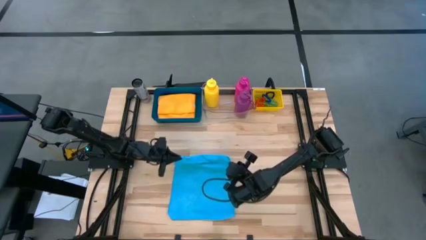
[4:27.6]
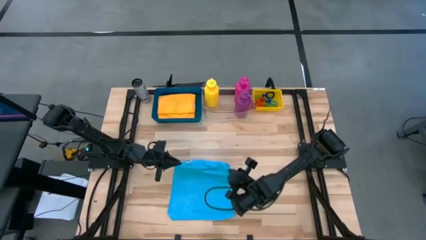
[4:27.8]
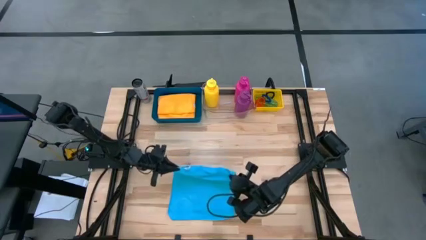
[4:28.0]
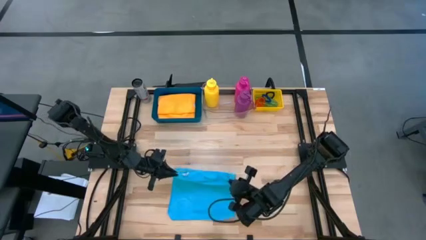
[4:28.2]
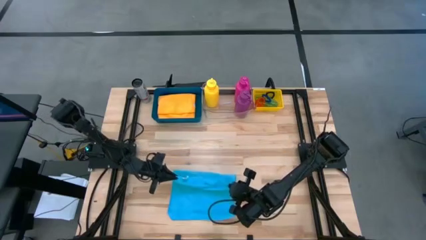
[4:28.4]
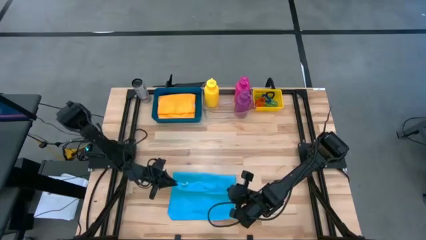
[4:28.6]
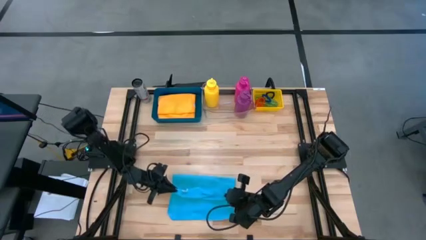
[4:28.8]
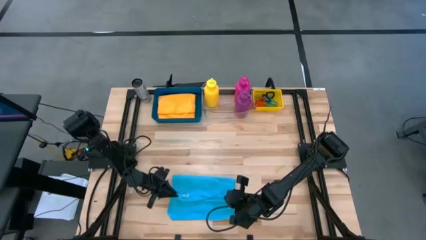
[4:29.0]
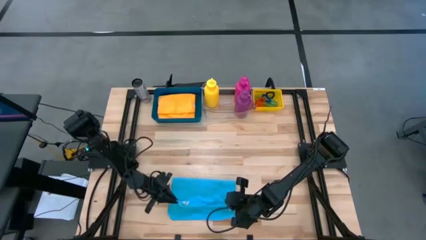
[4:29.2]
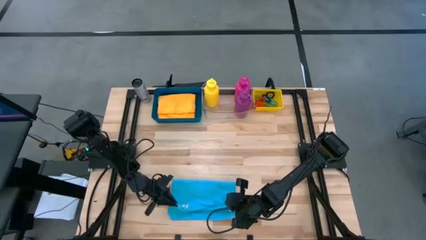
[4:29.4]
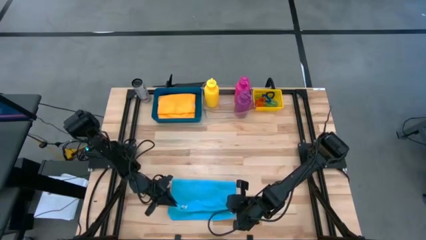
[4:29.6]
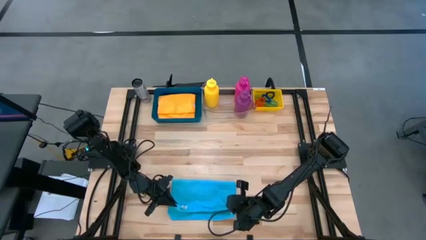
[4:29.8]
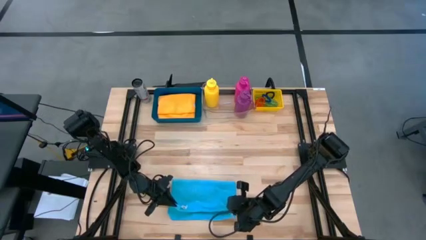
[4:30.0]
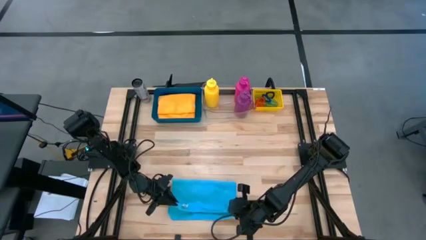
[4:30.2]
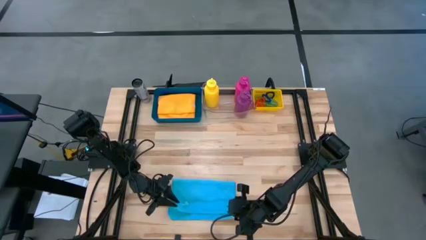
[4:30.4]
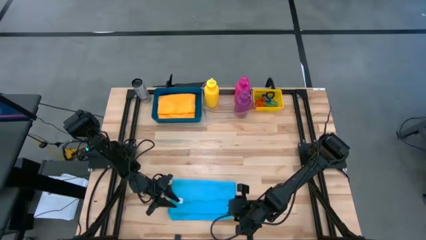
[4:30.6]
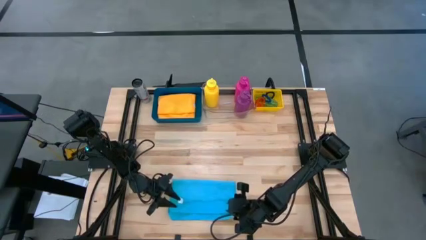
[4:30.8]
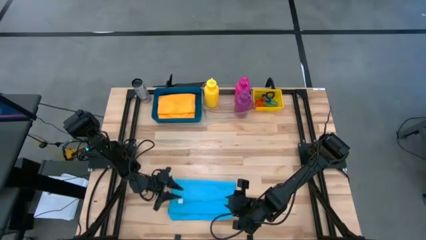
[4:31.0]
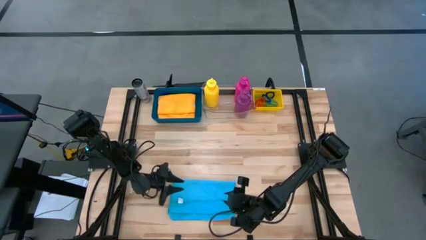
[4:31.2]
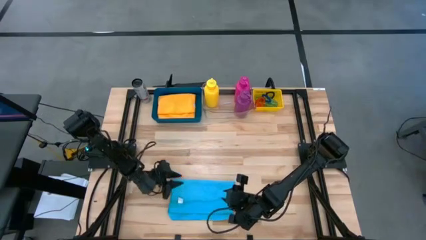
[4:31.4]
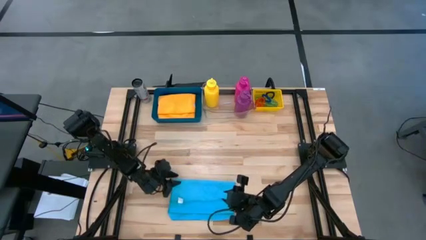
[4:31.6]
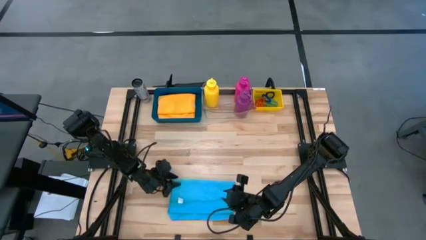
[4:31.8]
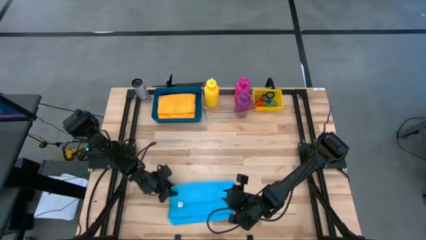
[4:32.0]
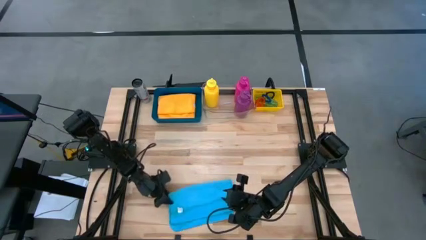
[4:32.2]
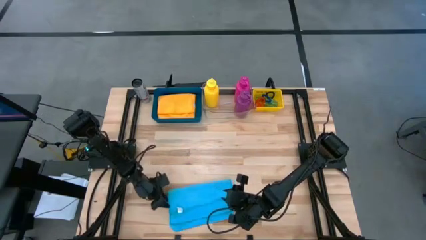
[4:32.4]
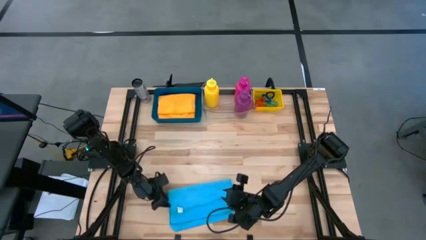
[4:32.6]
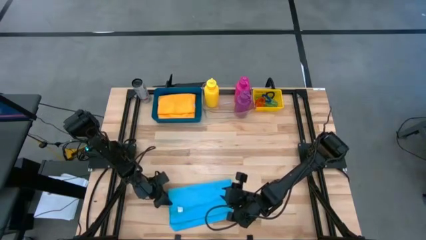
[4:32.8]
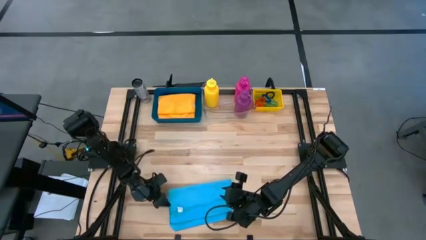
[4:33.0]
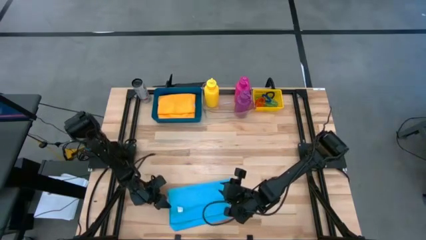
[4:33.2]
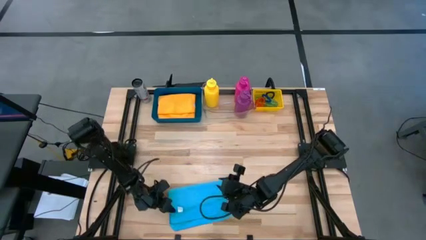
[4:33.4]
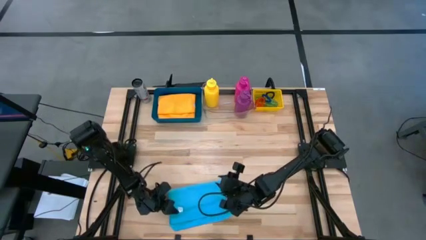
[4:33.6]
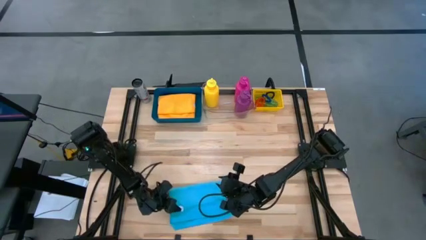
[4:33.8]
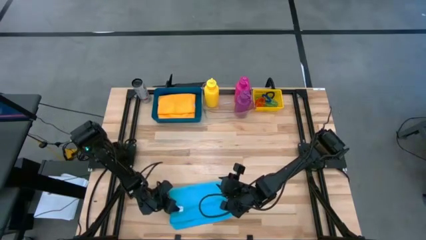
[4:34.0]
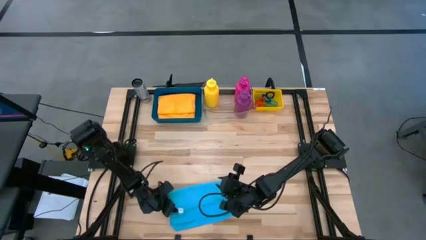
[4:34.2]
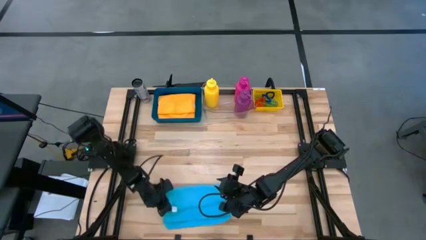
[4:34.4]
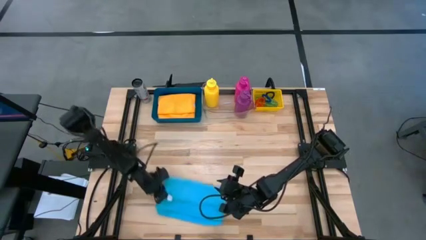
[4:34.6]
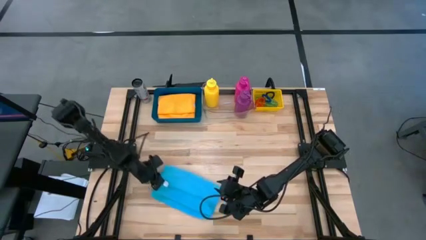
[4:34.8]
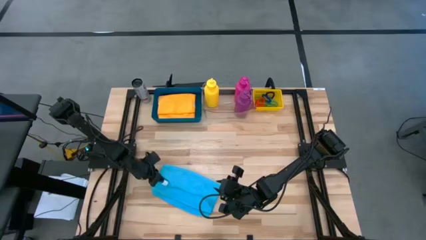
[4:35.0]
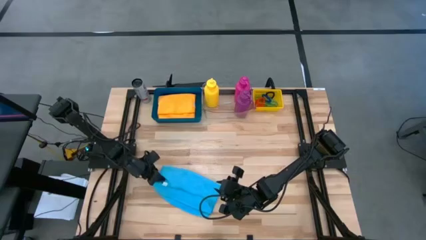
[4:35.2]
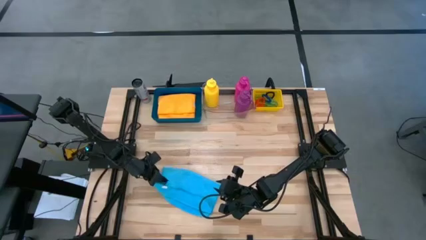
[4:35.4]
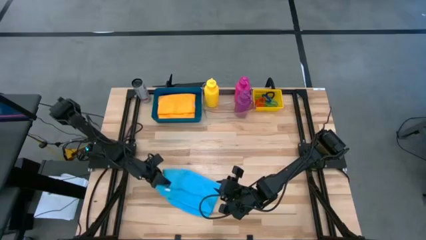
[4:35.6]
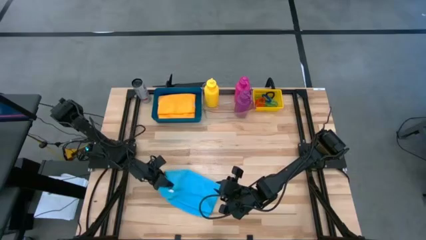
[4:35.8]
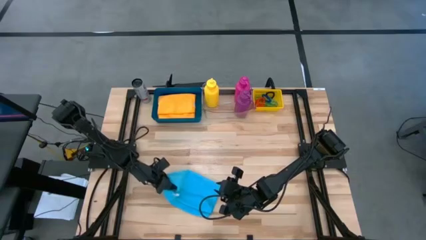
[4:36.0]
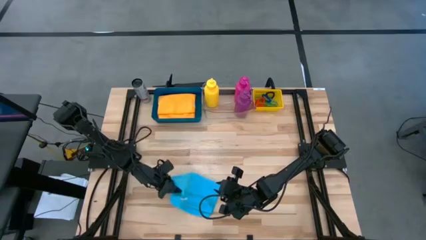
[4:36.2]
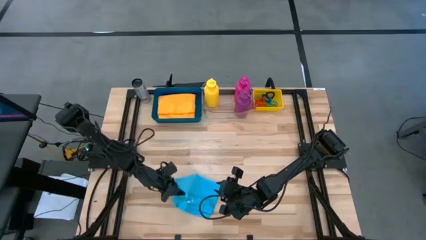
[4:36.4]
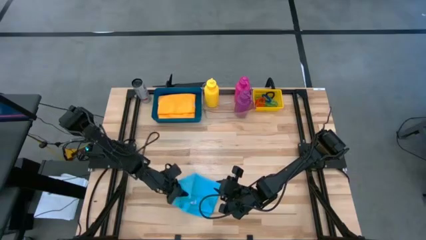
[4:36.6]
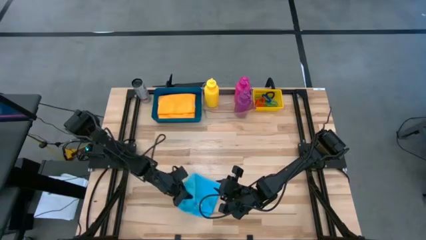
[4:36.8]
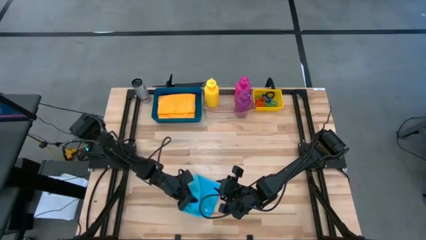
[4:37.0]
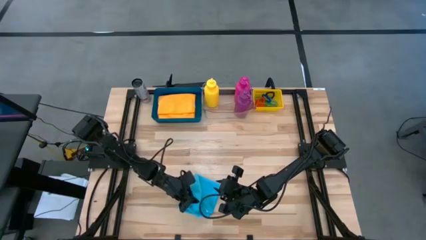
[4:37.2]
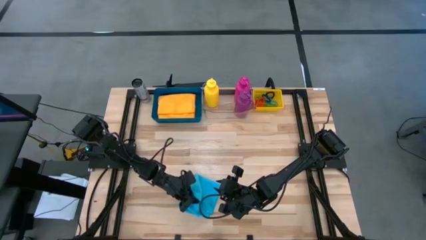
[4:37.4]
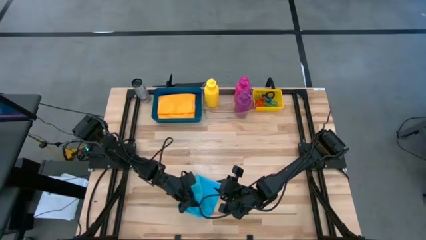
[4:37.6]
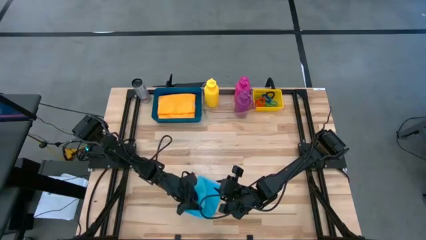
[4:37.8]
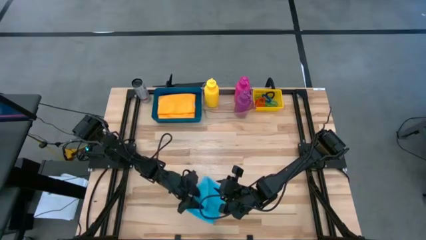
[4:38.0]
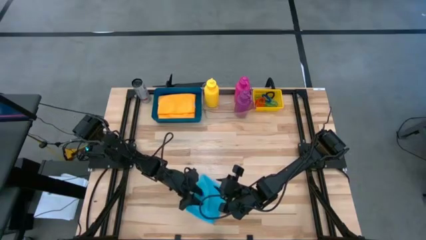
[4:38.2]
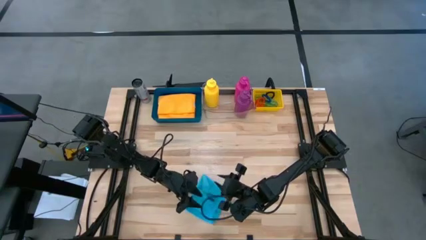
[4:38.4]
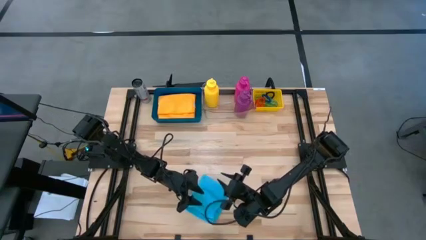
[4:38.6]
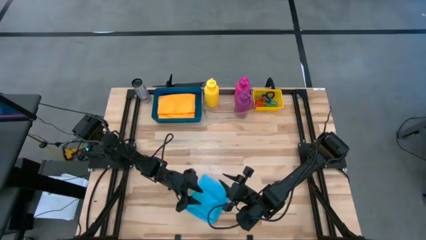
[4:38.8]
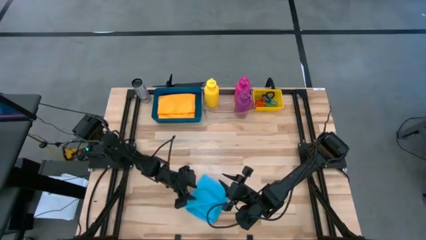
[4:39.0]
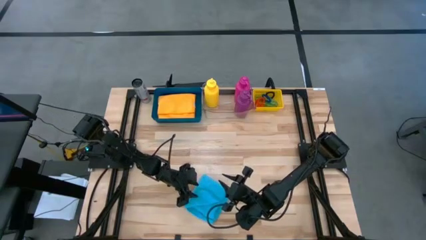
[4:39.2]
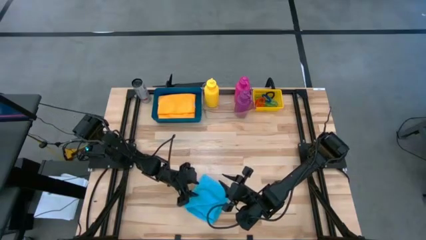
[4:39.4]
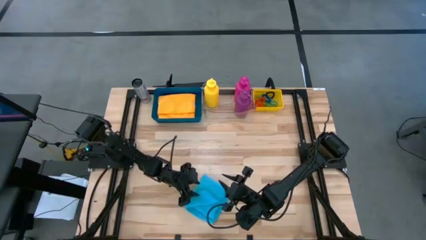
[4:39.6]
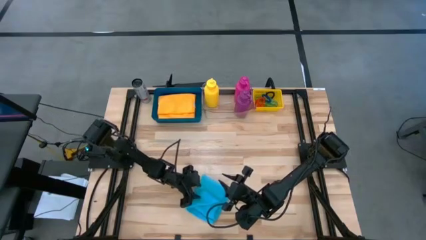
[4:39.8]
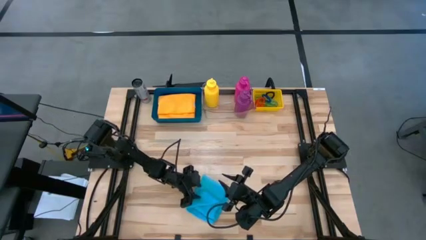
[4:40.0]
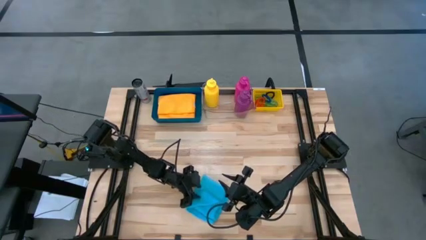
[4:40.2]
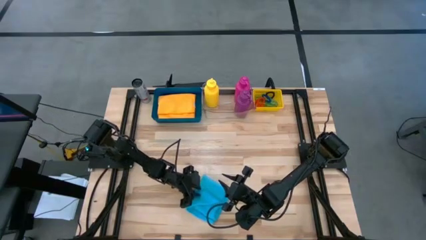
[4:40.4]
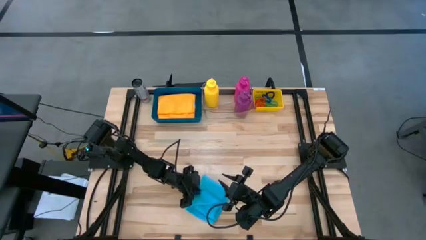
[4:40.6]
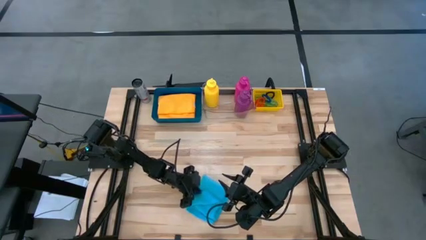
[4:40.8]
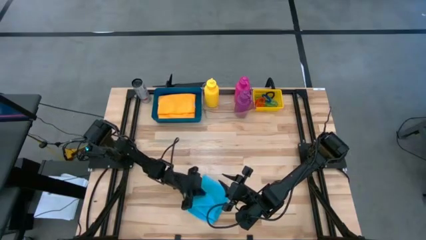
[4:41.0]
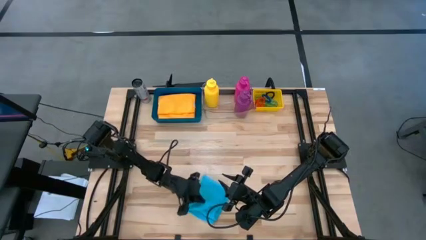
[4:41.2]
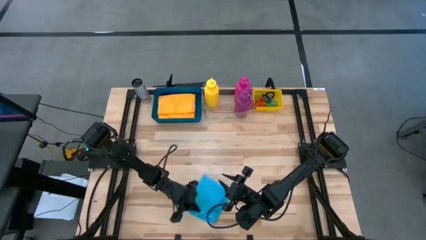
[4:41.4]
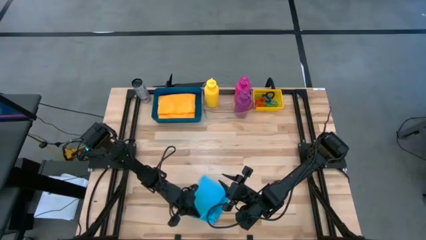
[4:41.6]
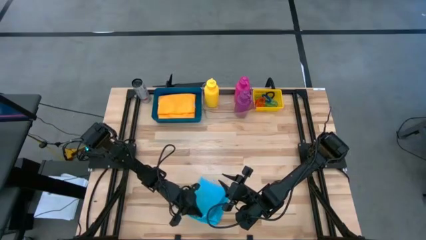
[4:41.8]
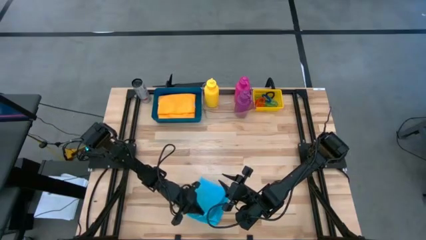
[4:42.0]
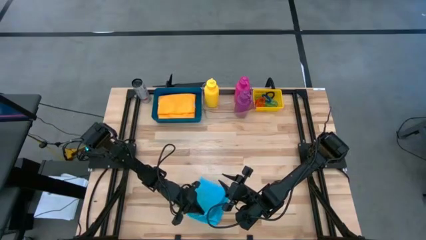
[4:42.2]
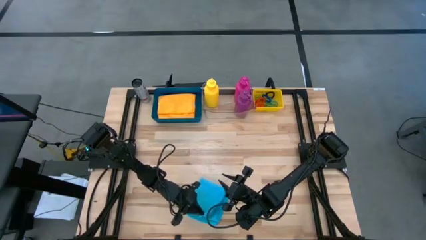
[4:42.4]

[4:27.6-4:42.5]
Task: Pick & Place Sports Items
Fold the blue towel
